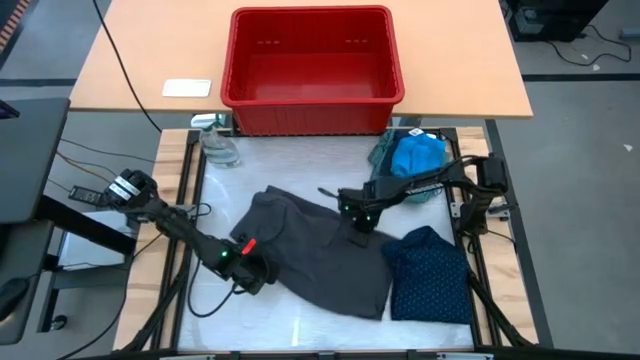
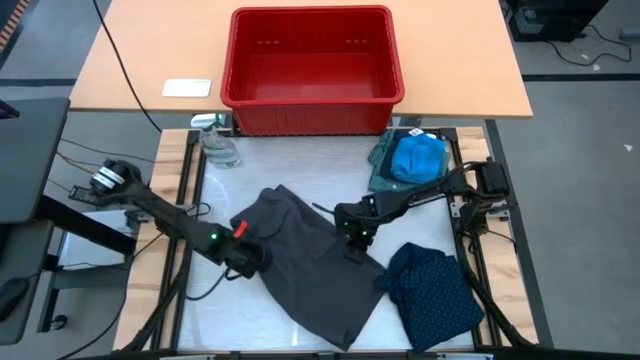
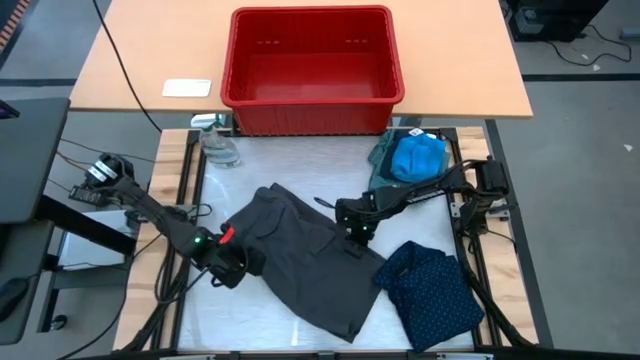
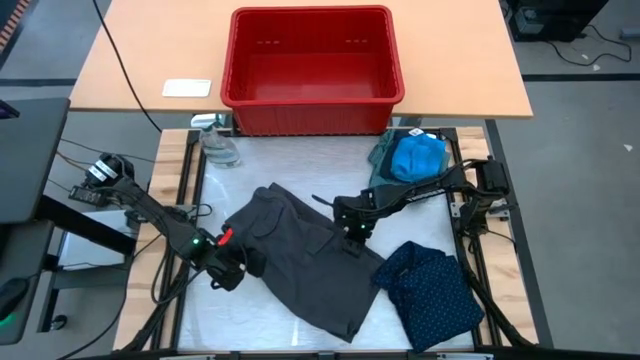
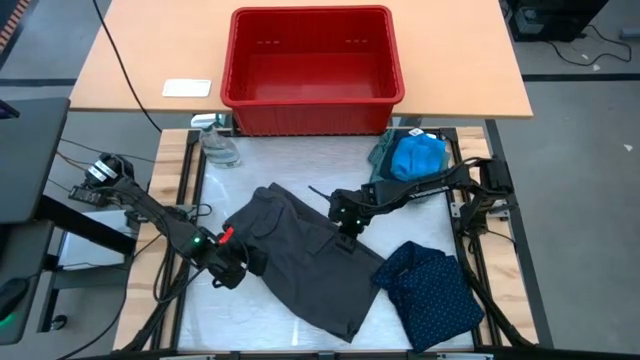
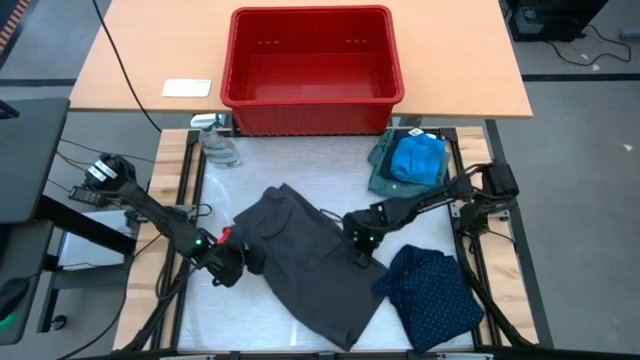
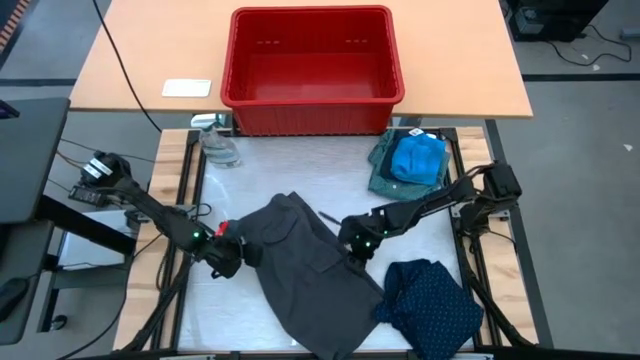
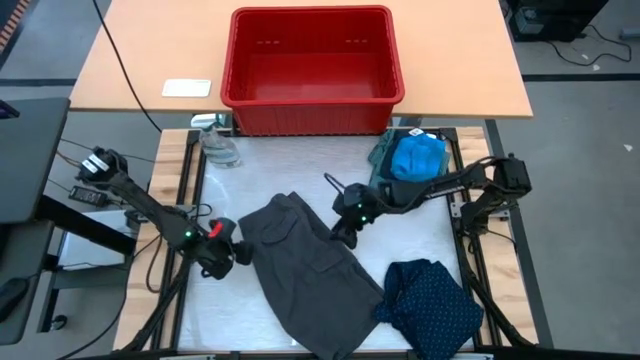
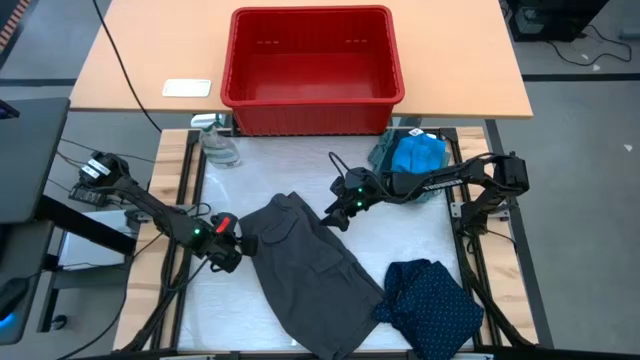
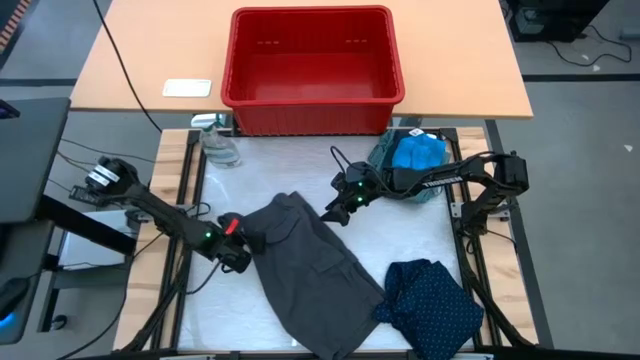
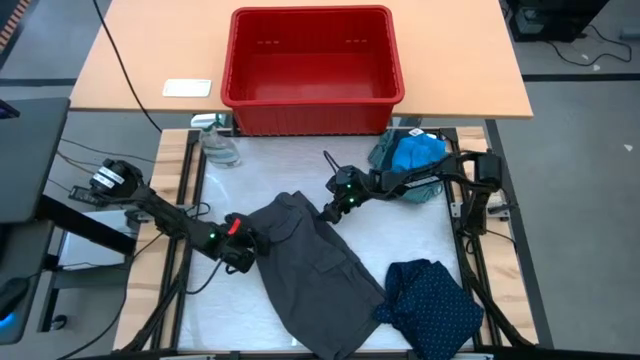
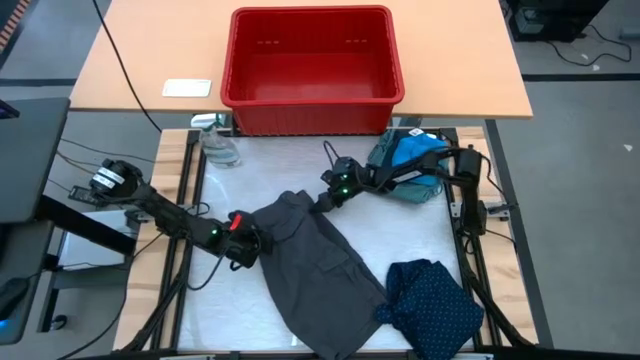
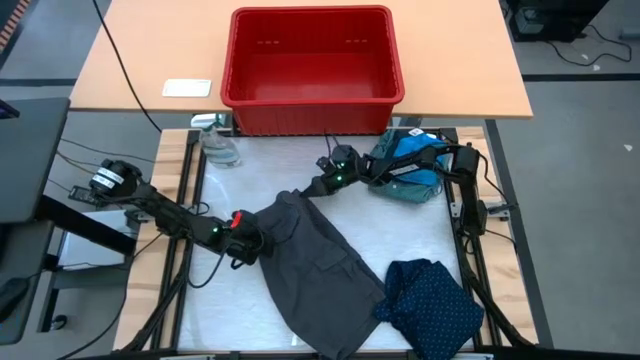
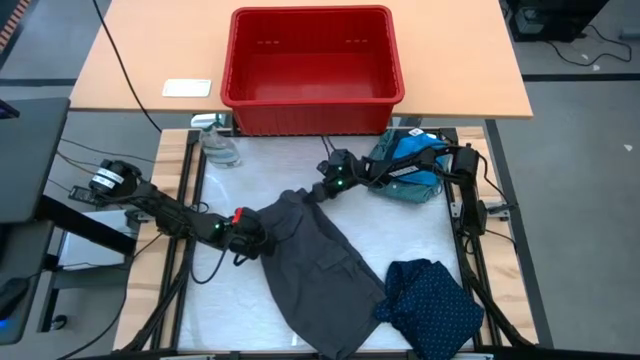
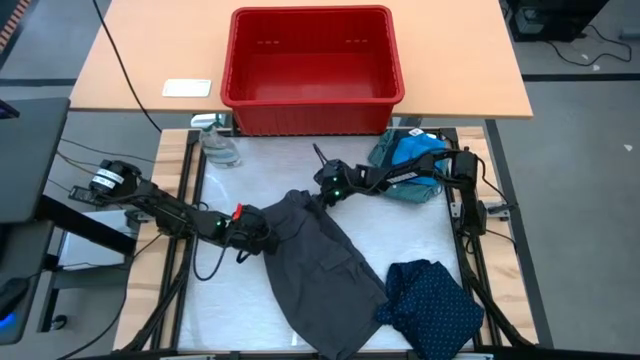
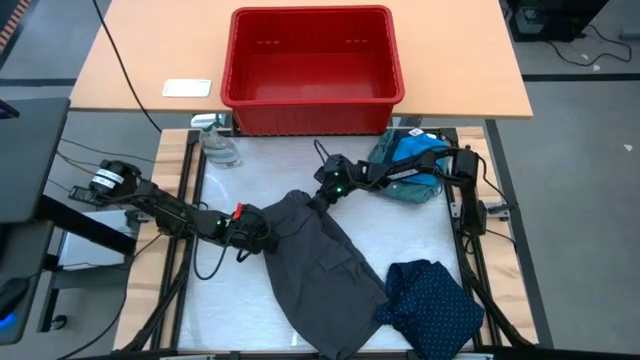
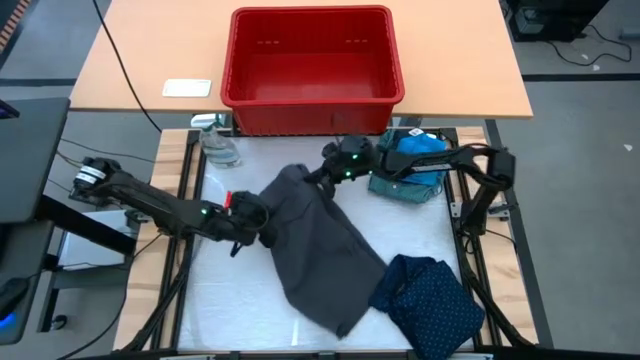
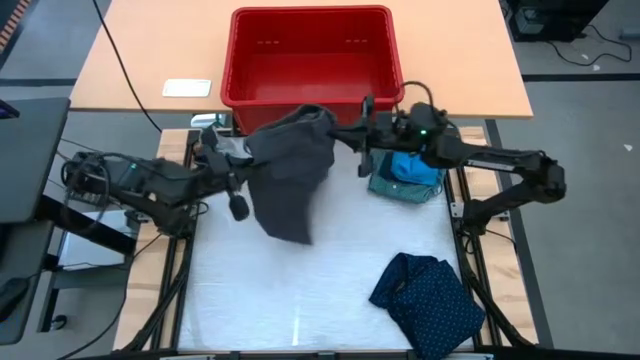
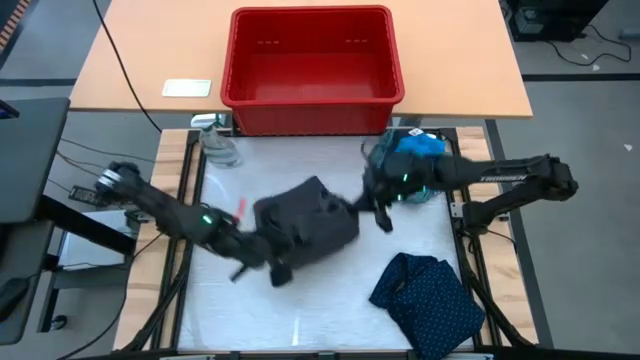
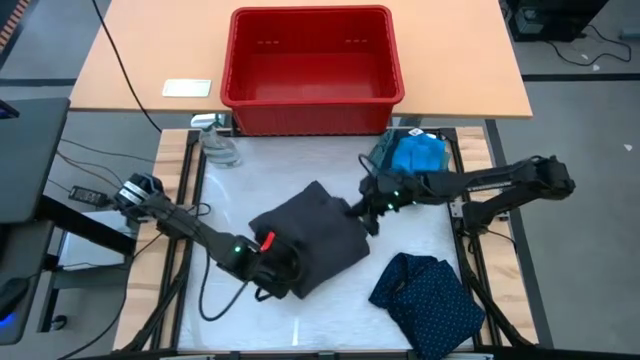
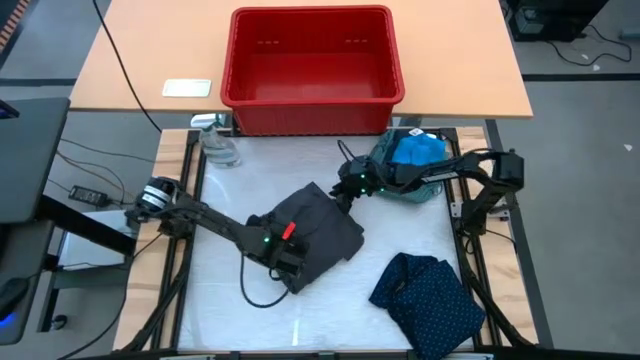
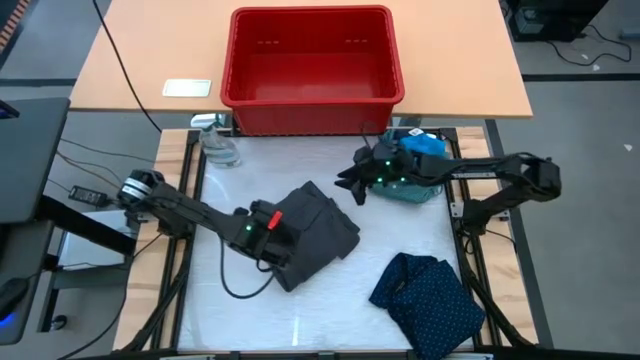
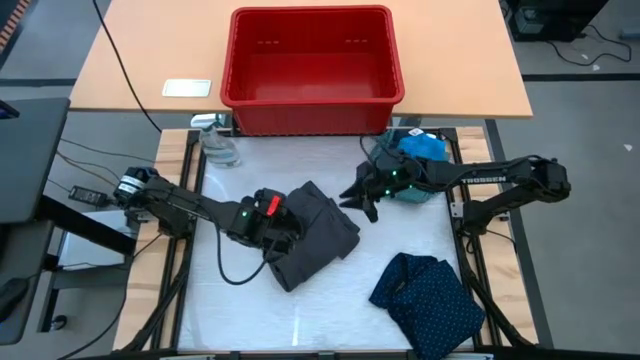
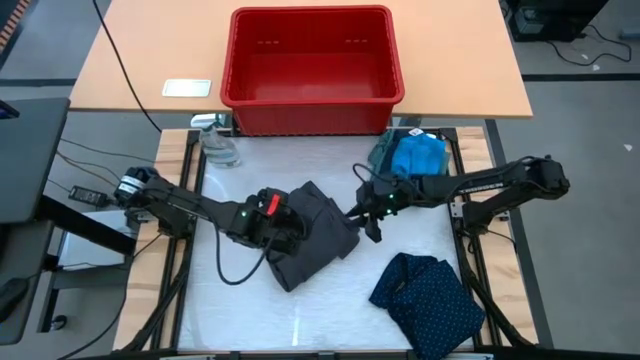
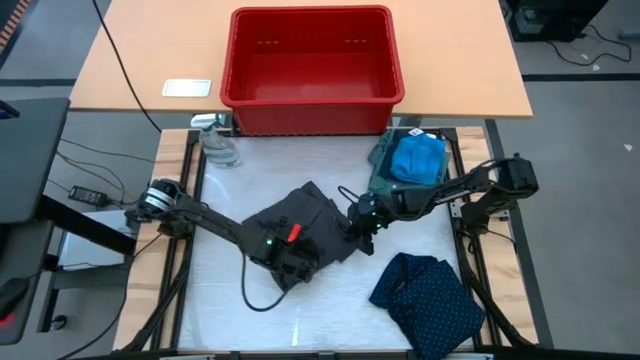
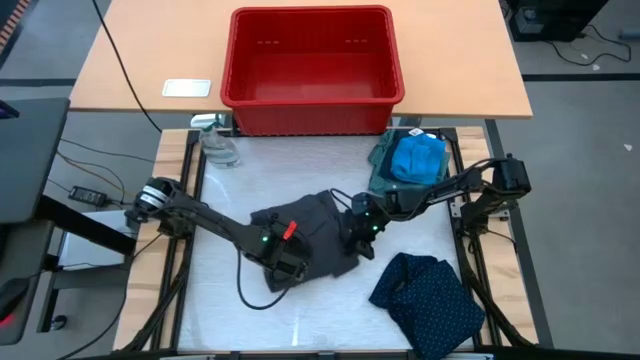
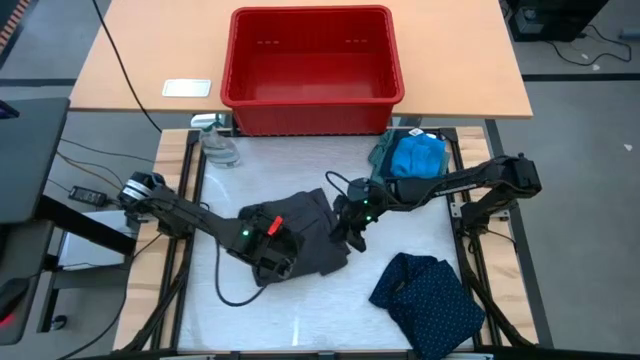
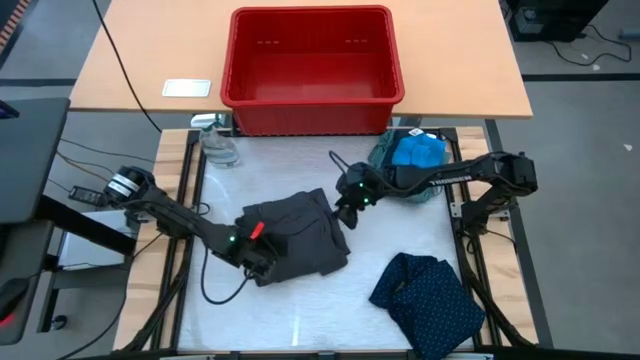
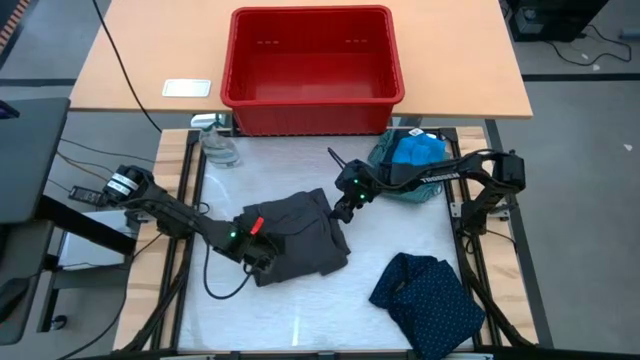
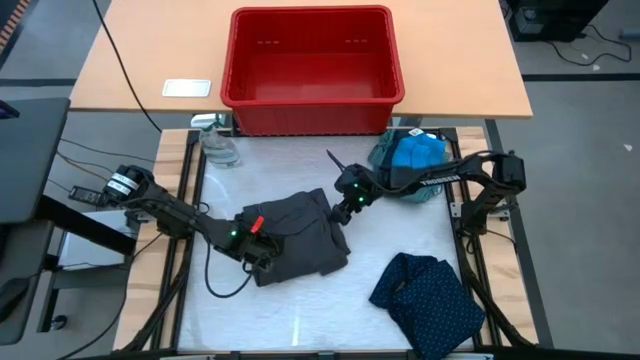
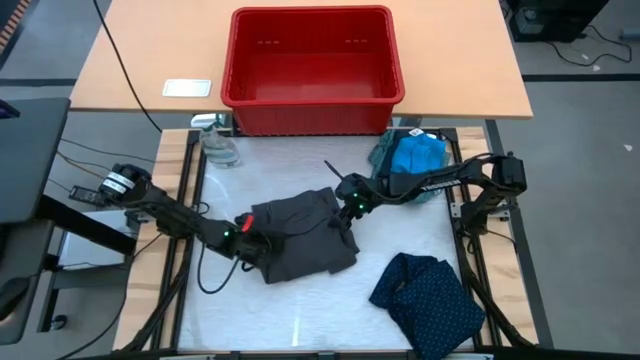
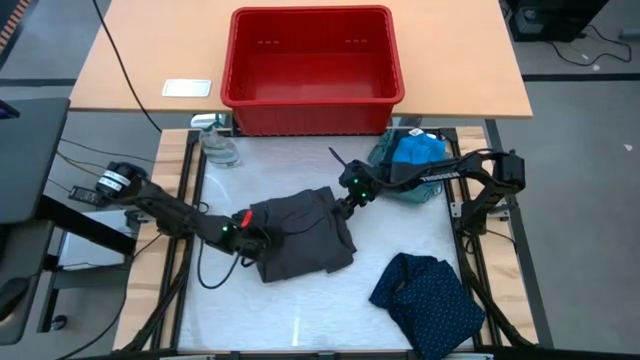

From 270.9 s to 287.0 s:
Task: Fold laundry
Fold the gray shorts

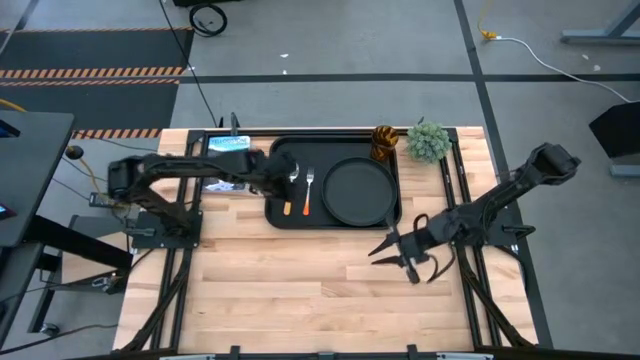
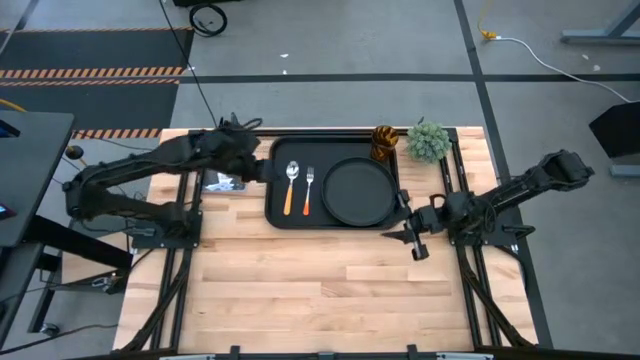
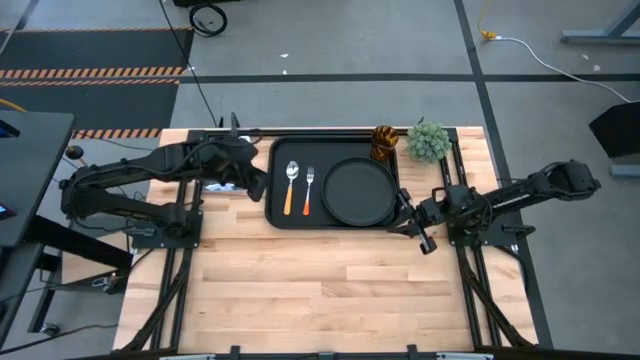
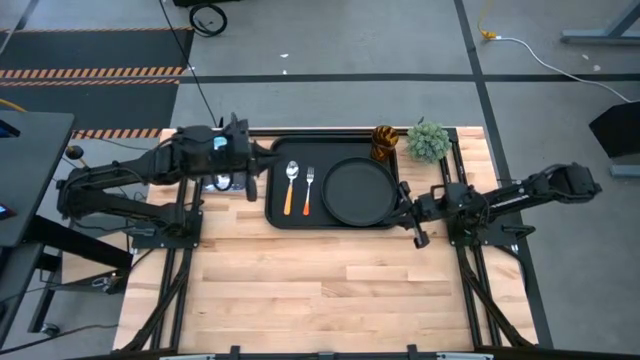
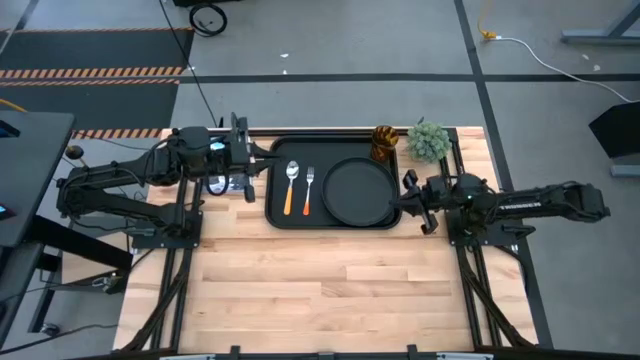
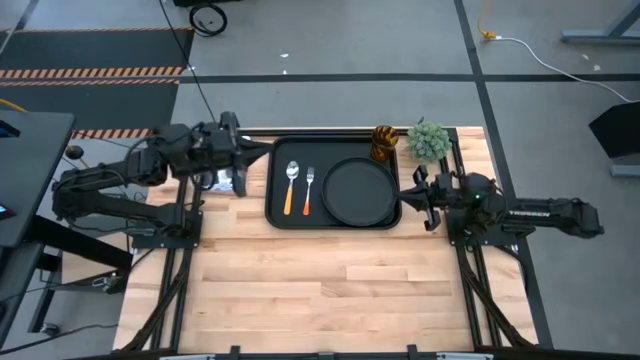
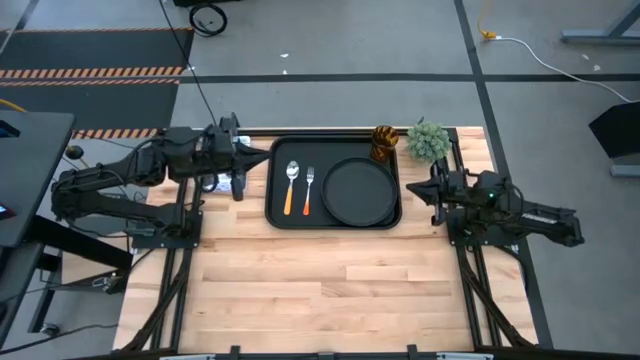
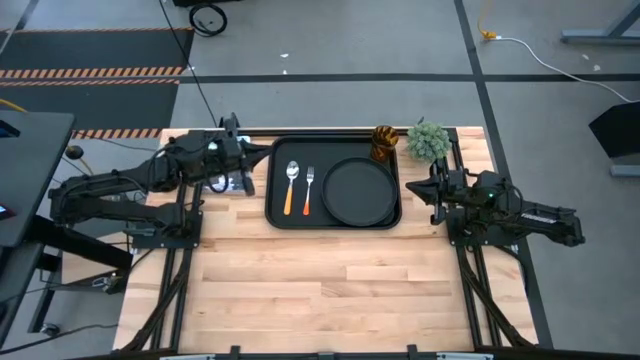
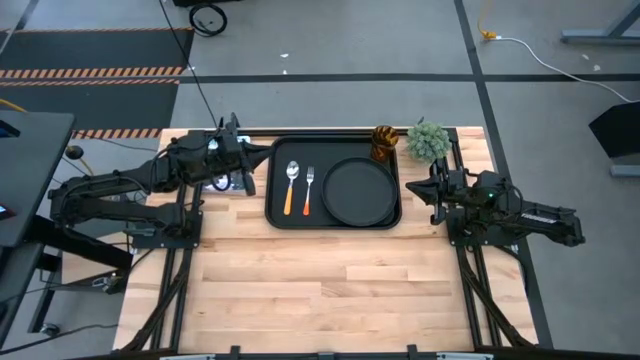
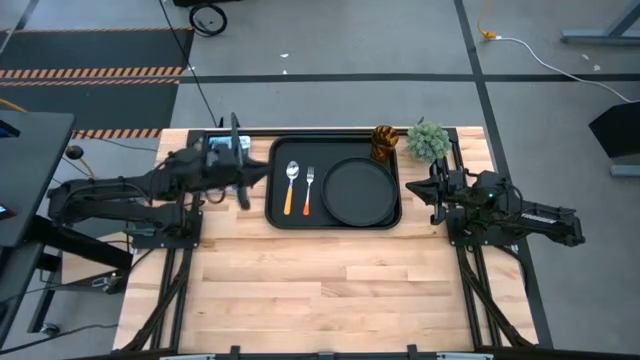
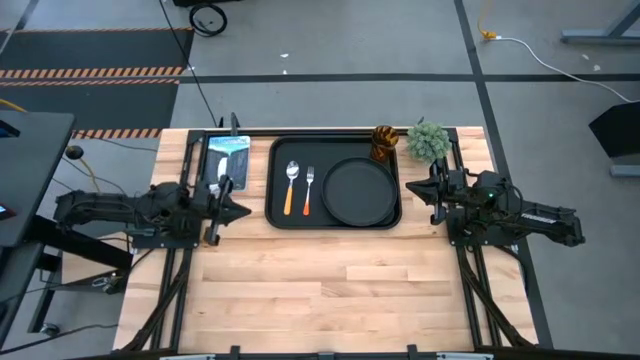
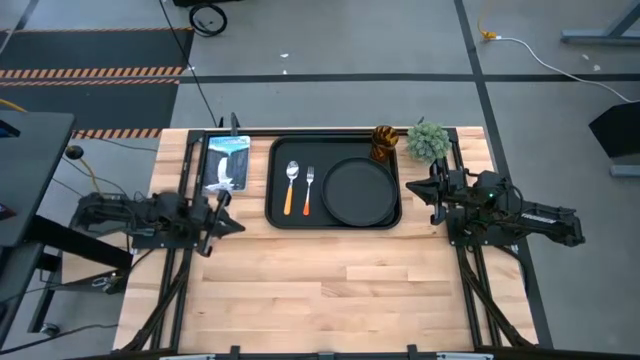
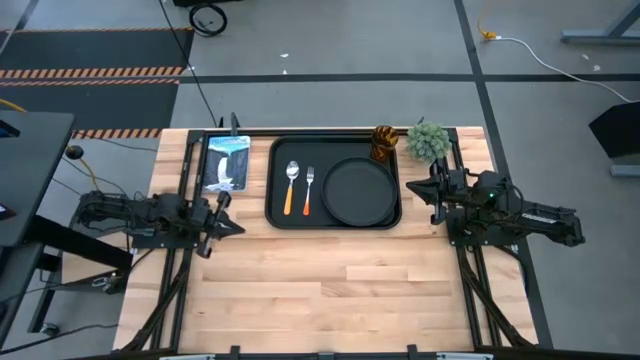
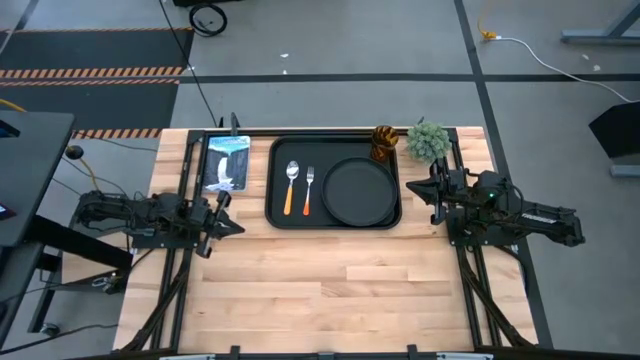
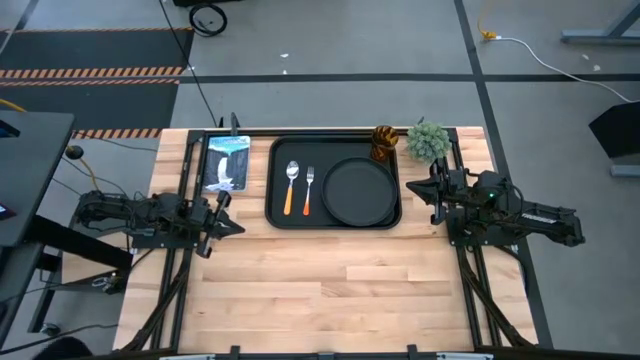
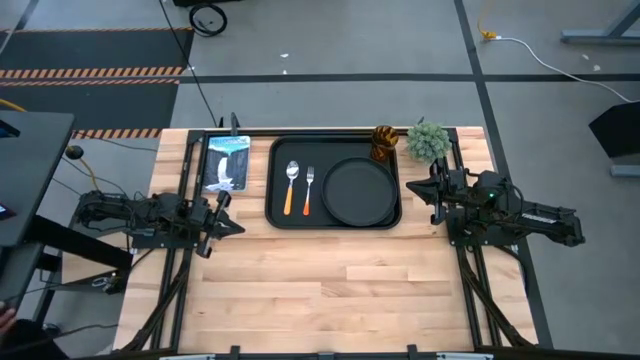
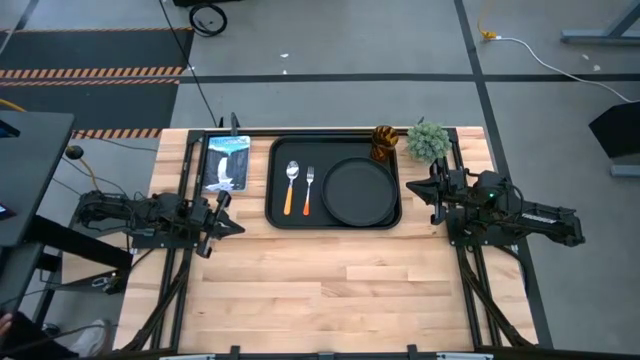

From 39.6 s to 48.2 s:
Task: Pick and place plate/cup/fork/spoon on tray
Return to Home Position
